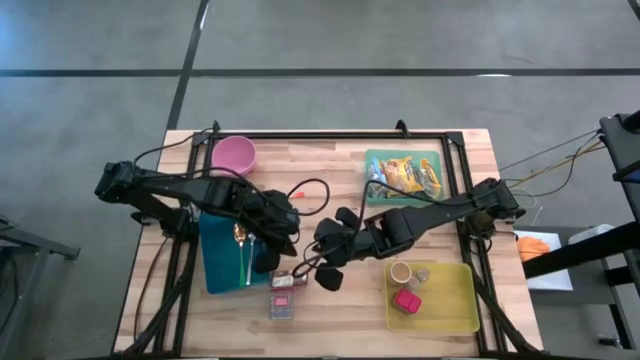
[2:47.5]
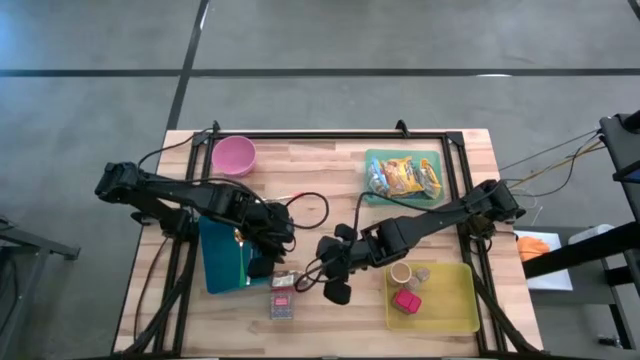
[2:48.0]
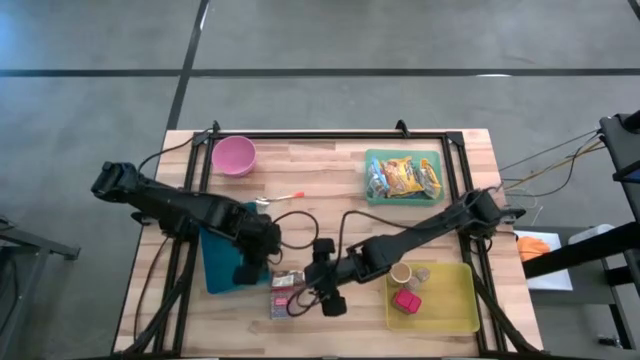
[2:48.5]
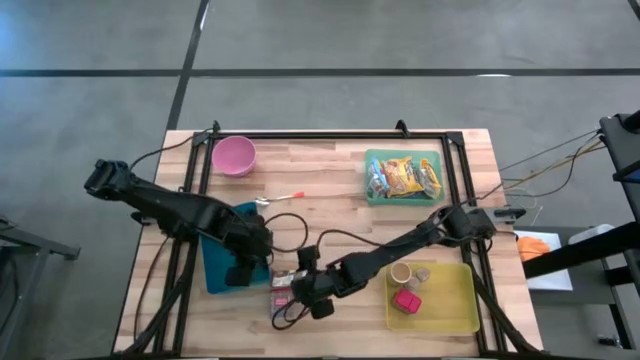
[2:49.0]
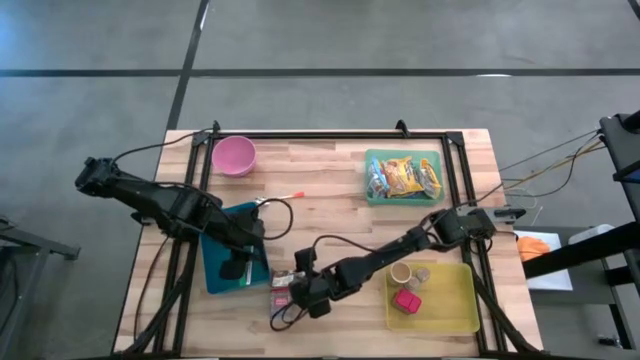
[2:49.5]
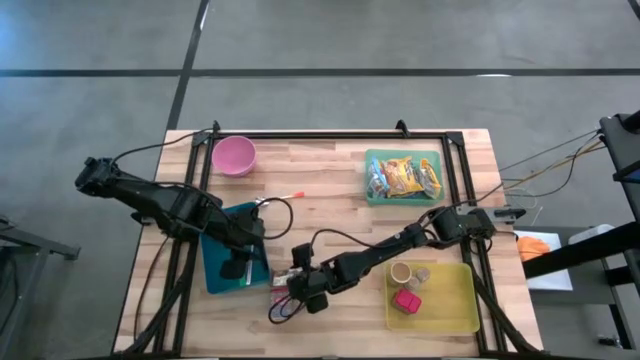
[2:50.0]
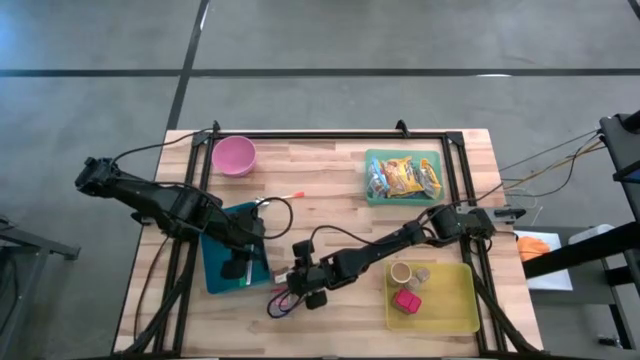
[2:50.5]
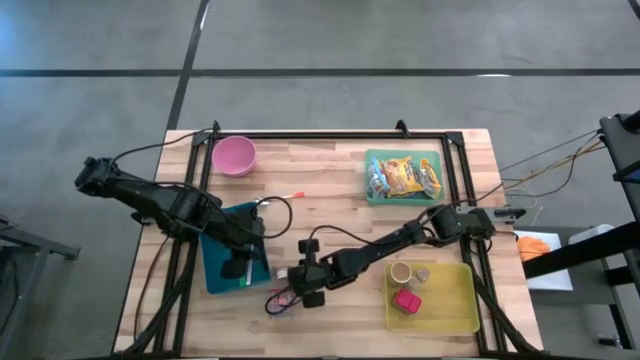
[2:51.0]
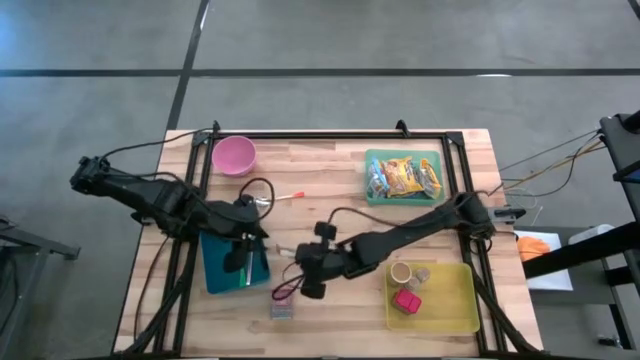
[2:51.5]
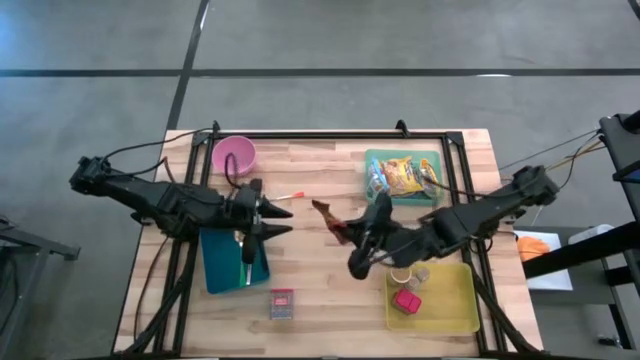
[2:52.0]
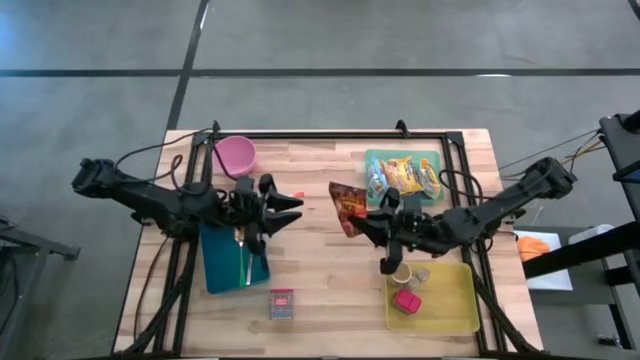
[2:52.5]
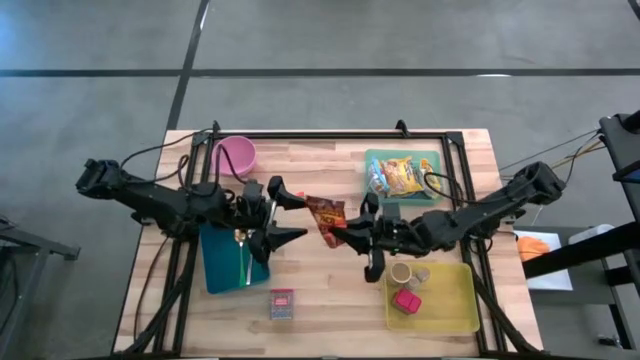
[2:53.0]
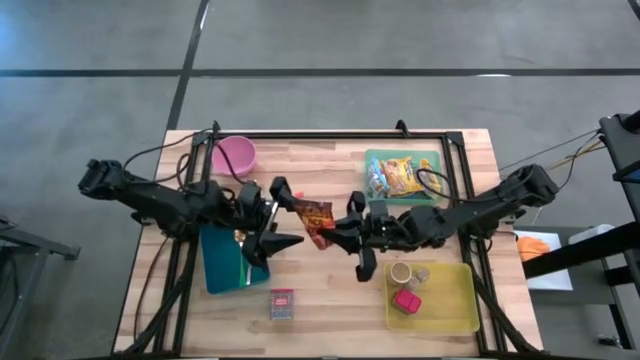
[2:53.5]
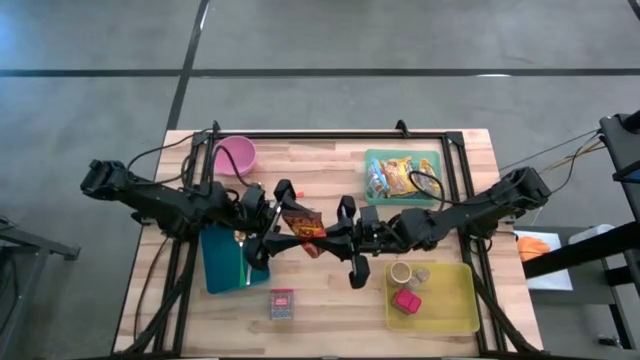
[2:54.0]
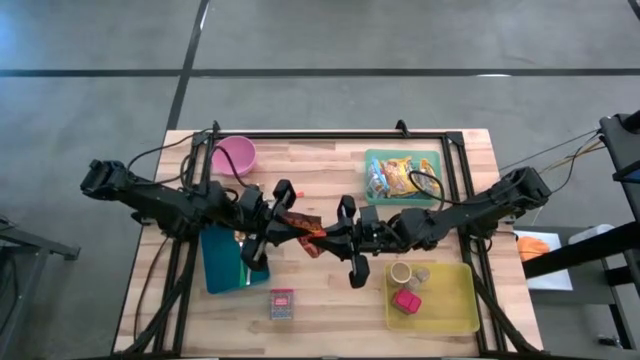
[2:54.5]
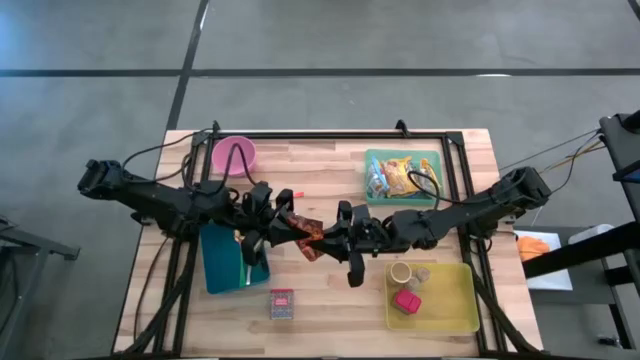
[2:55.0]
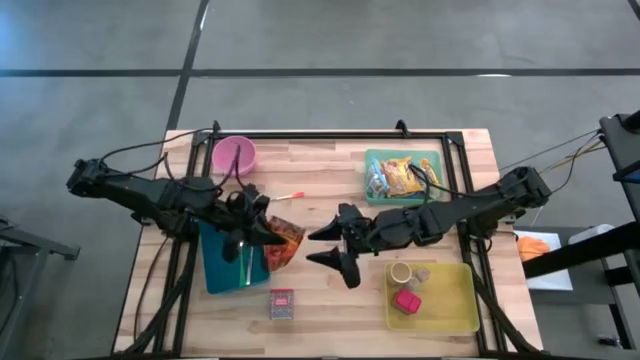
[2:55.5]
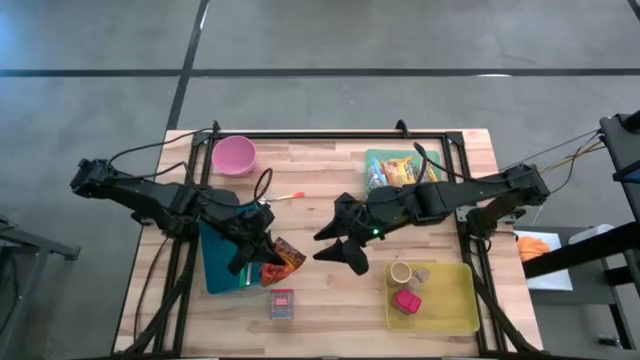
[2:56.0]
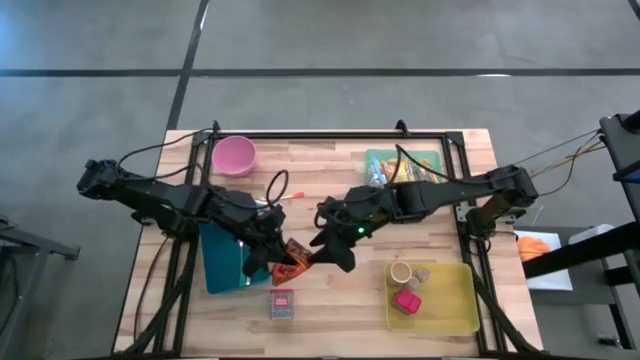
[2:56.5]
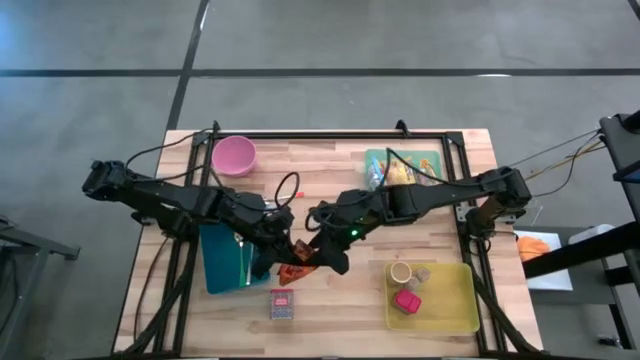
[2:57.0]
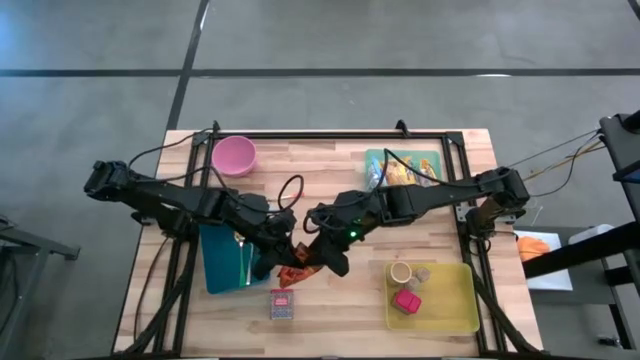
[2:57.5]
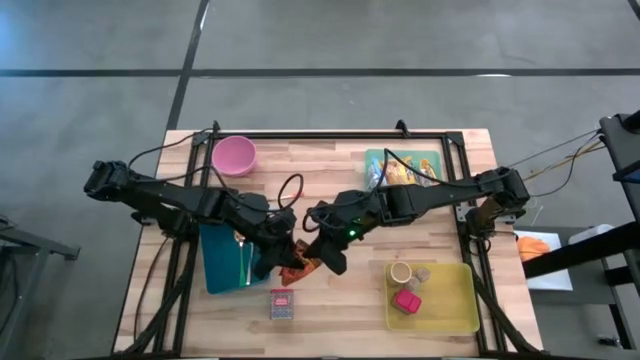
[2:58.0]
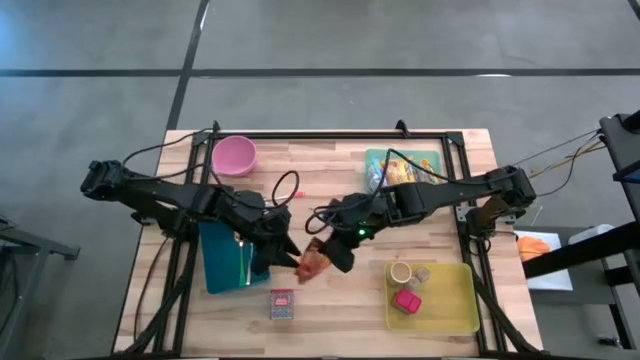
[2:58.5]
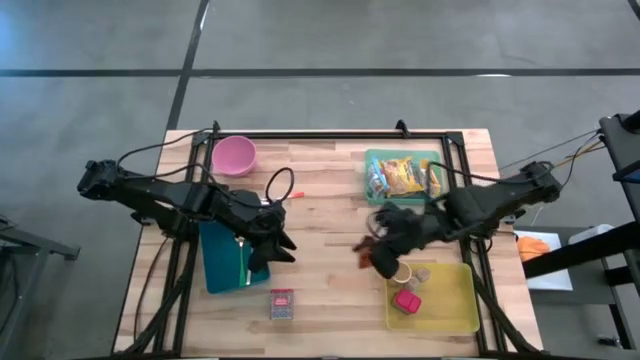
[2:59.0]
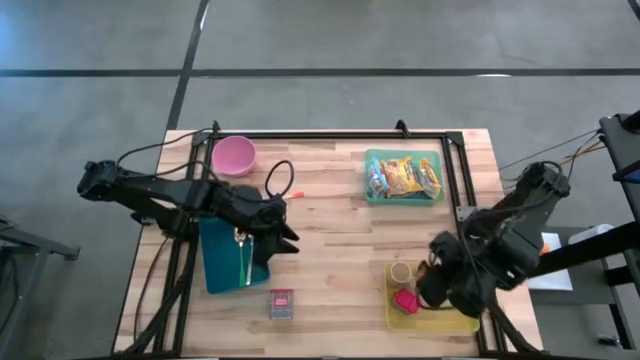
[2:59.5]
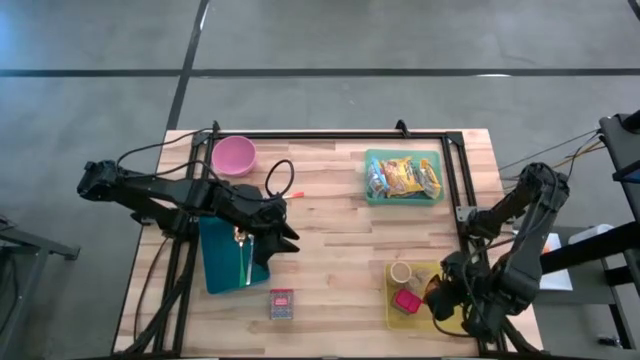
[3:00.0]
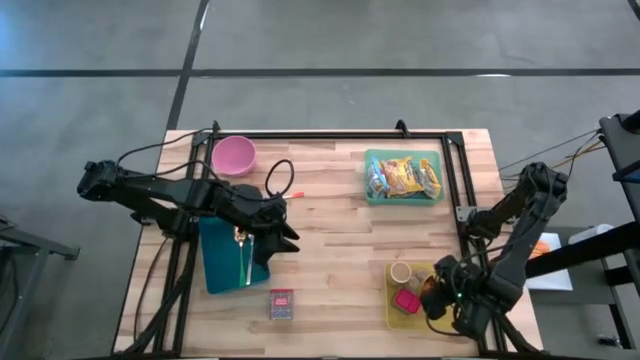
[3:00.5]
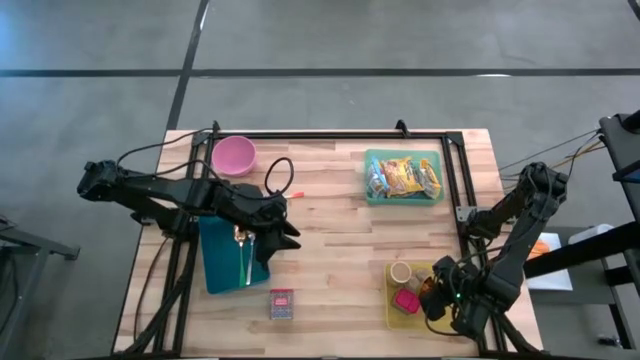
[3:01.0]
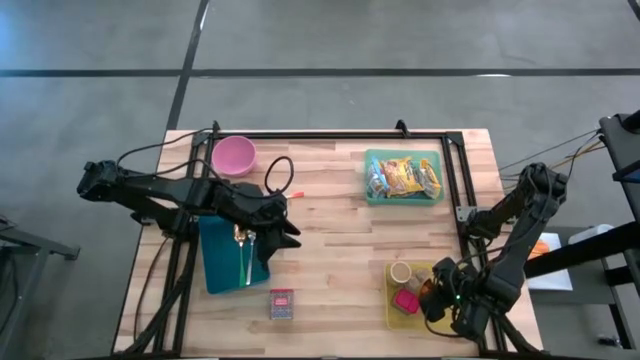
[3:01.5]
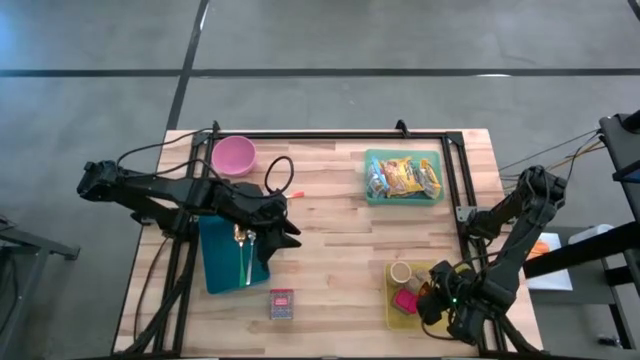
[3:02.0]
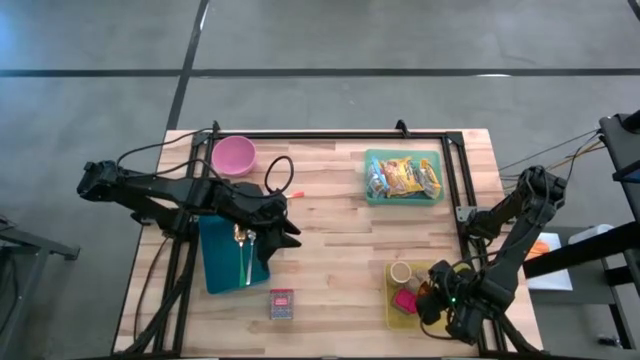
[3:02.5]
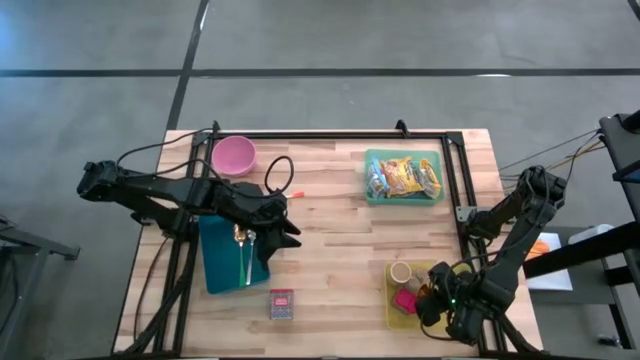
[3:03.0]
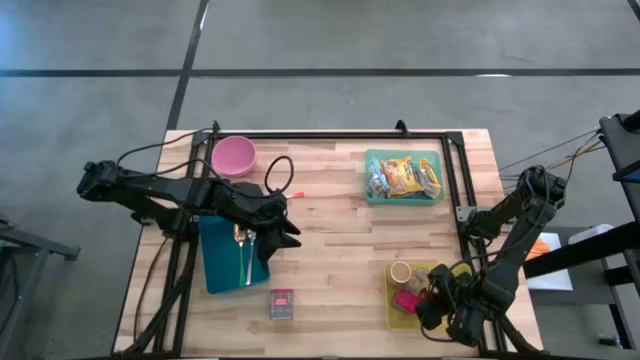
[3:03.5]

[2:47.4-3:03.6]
Put the orange spice pack into the yellow bin
